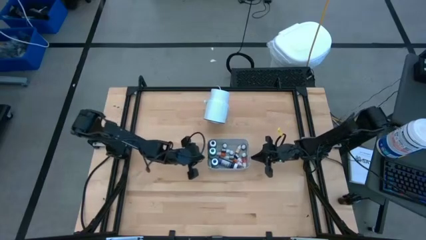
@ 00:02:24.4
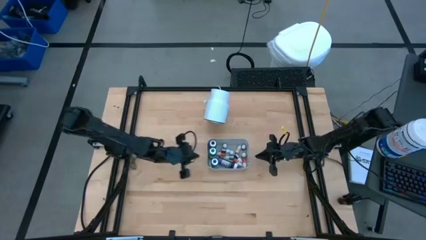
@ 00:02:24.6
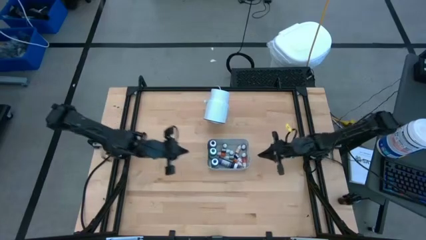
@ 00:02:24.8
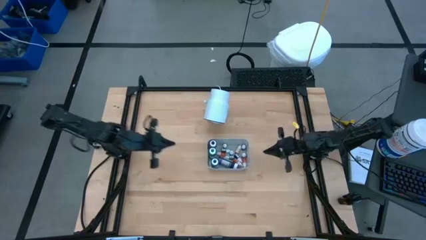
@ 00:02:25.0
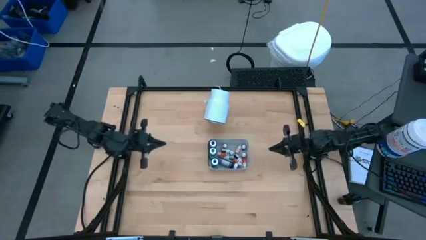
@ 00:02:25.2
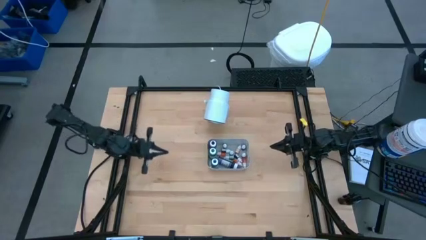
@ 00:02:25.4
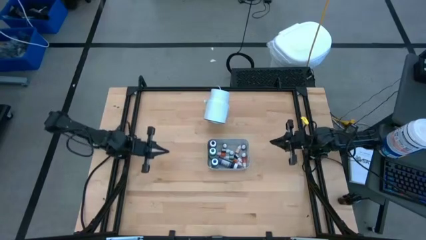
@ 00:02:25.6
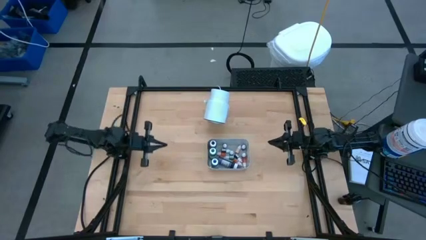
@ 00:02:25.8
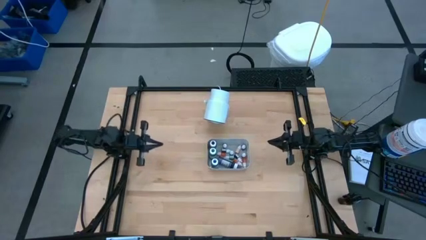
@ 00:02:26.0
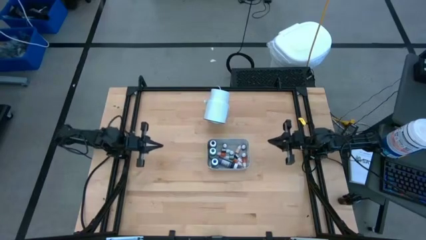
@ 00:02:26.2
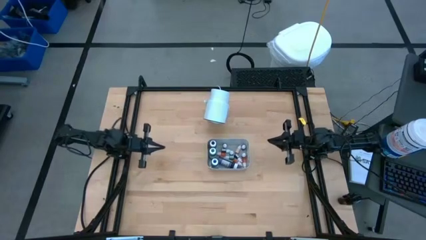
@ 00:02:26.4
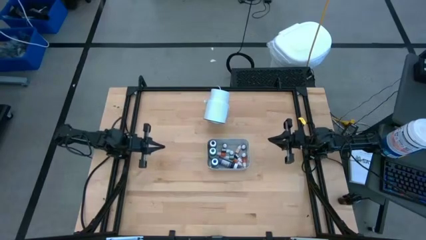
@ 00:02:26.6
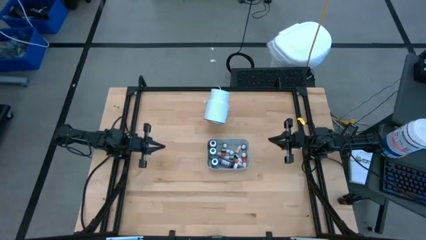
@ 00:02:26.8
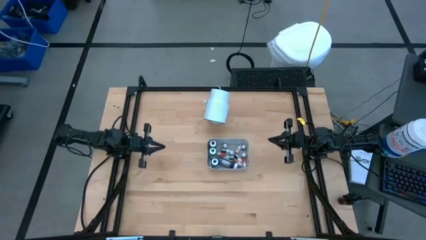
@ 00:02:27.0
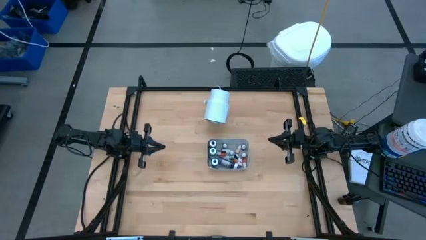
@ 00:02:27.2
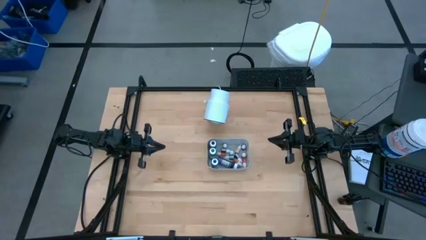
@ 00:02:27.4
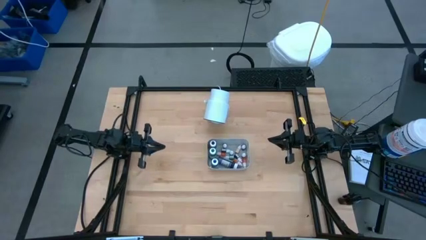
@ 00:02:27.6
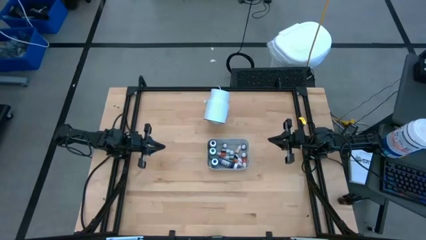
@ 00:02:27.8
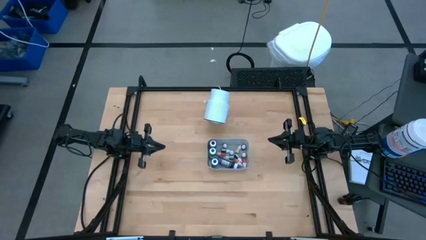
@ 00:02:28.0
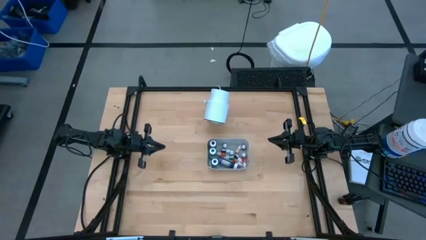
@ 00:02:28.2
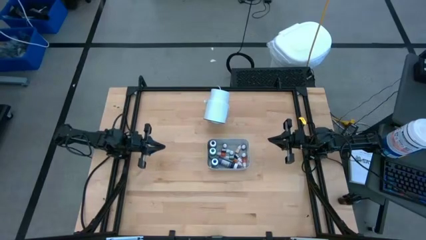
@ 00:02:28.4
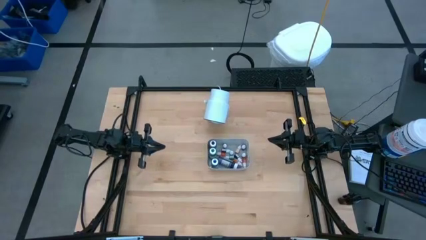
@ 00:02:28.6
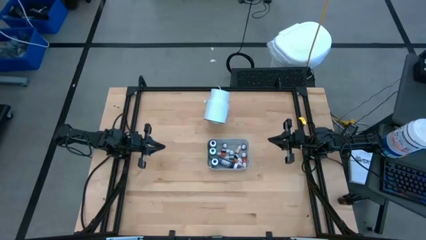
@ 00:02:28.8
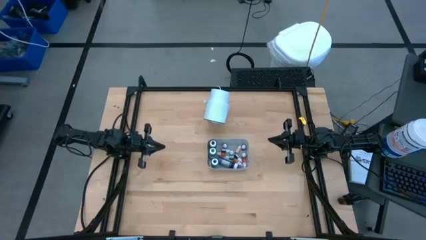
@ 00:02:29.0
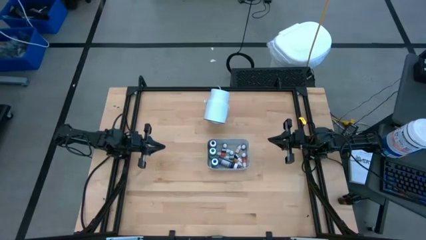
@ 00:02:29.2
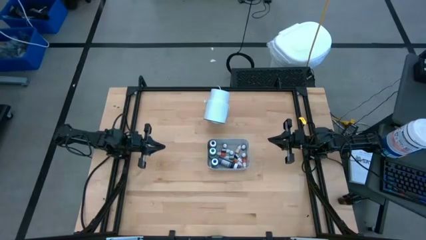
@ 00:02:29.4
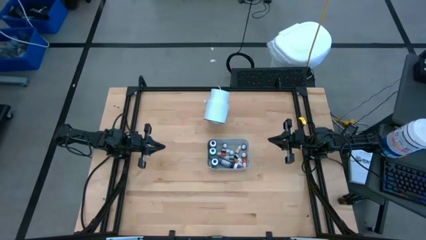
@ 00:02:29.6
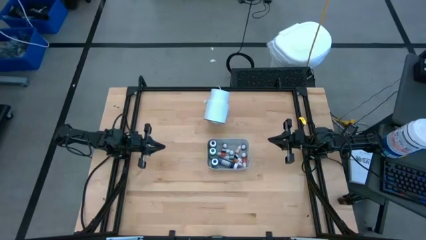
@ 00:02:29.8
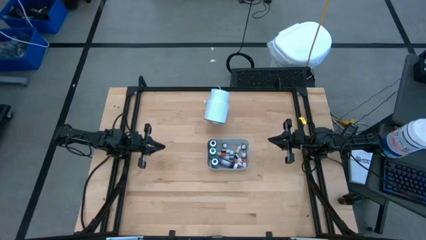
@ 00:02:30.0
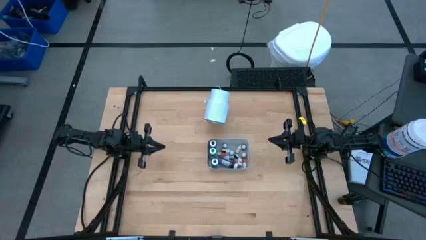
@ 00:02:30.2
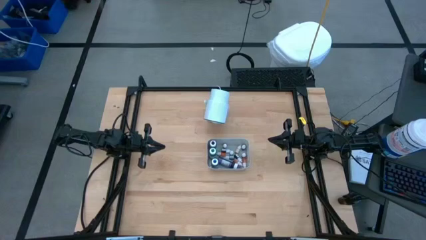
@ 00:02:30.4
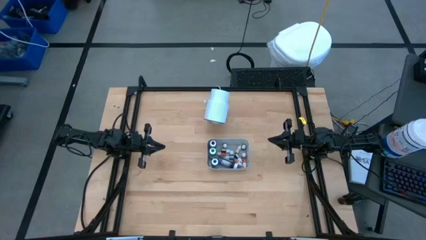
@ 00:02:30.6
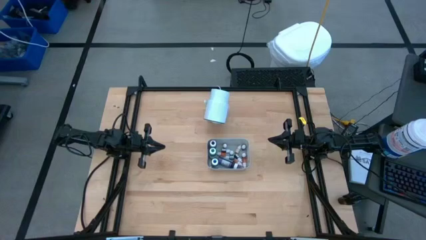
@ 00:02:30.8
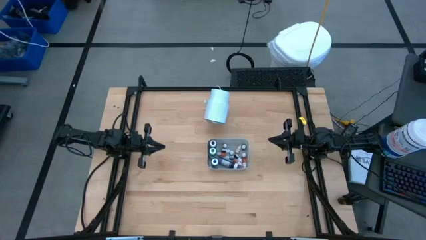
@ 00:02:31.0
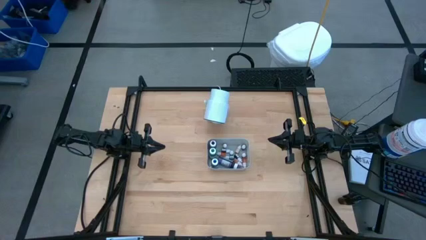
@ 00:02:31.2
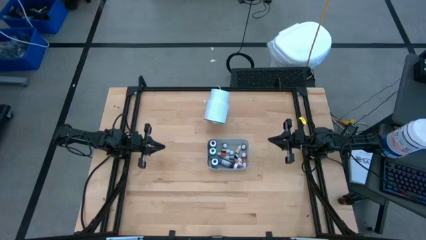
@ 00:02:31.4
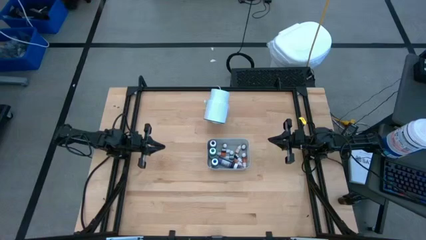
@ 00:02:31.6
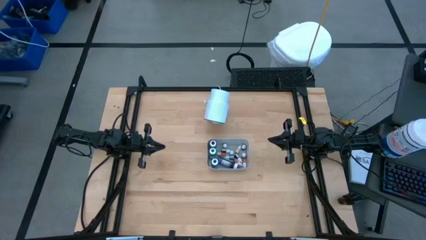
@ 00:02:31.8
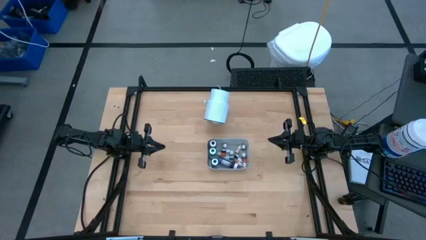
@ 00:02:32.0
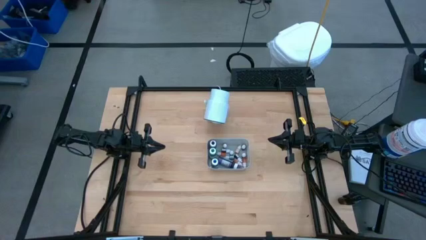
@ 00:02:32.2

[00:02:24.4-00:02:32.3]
Task: Pick & Place food coloring
Return to Home Position

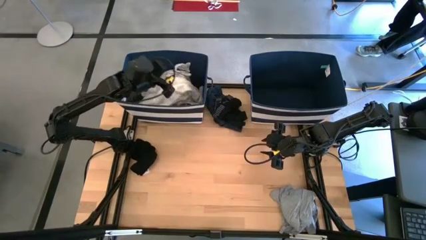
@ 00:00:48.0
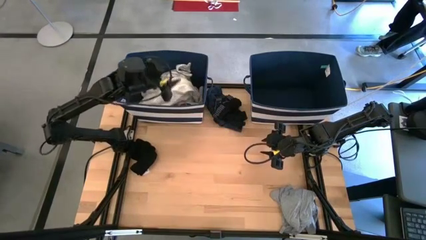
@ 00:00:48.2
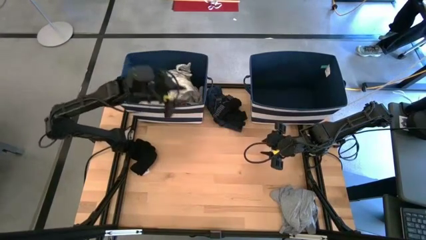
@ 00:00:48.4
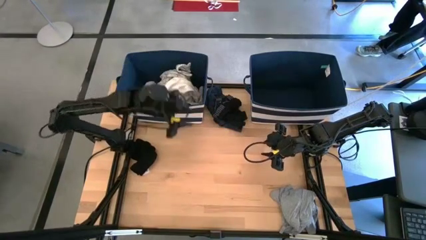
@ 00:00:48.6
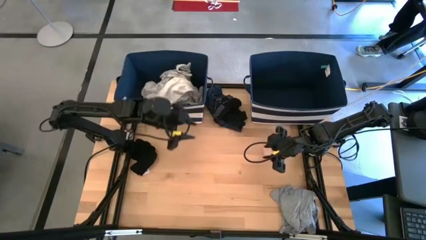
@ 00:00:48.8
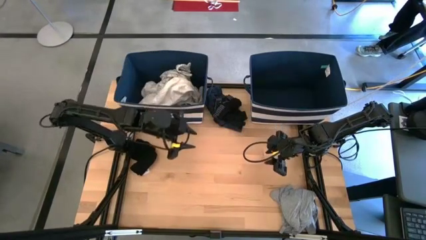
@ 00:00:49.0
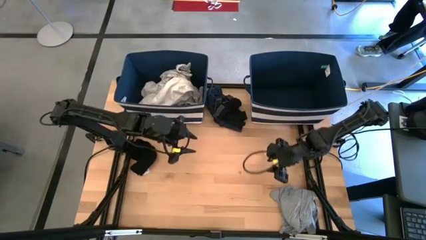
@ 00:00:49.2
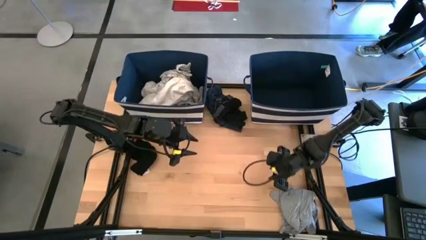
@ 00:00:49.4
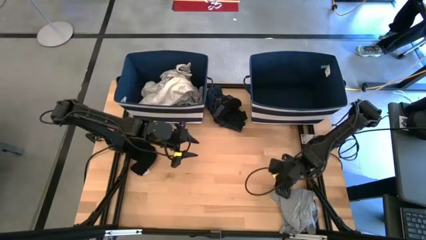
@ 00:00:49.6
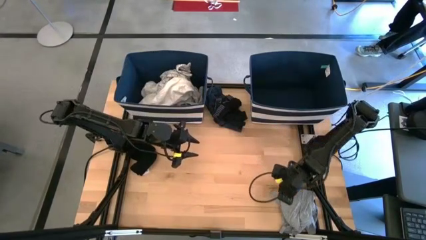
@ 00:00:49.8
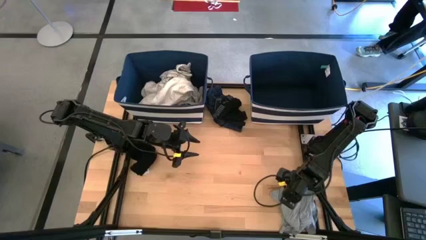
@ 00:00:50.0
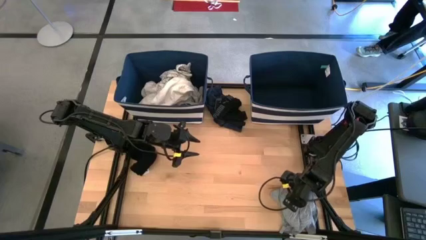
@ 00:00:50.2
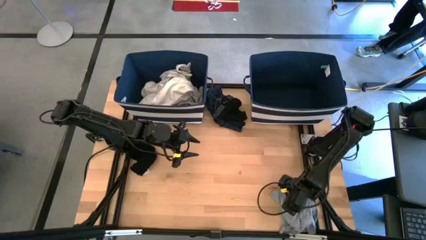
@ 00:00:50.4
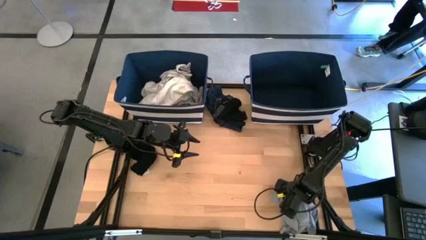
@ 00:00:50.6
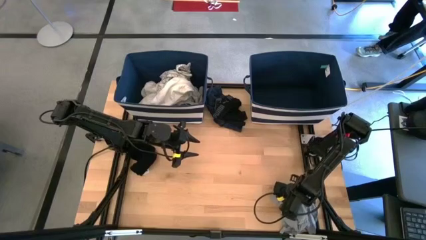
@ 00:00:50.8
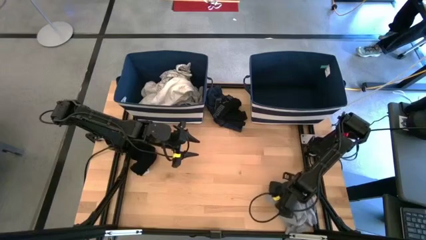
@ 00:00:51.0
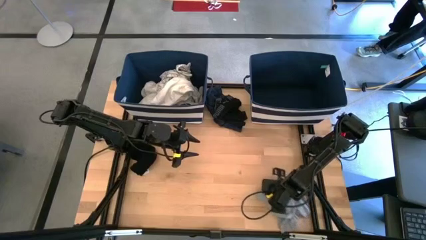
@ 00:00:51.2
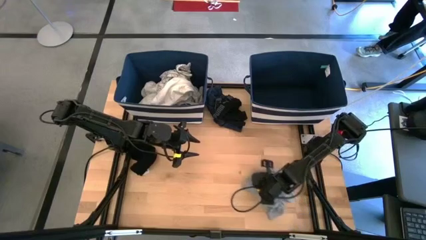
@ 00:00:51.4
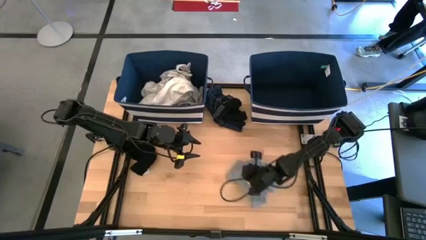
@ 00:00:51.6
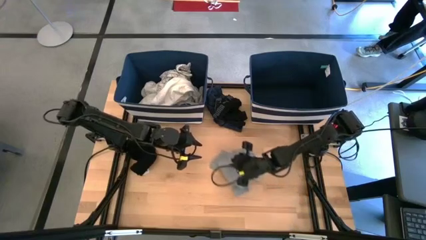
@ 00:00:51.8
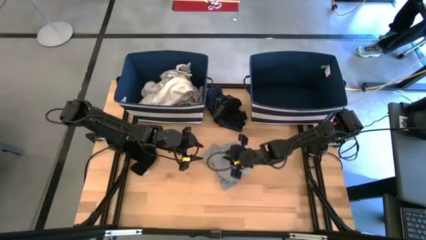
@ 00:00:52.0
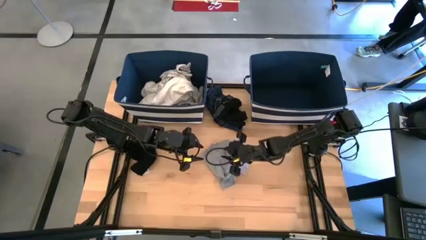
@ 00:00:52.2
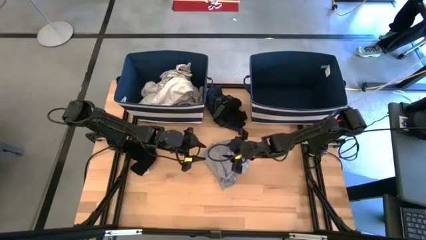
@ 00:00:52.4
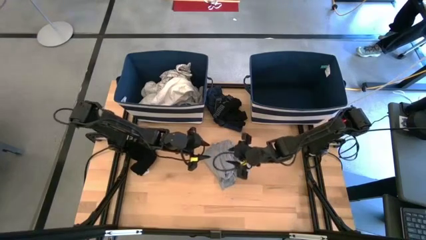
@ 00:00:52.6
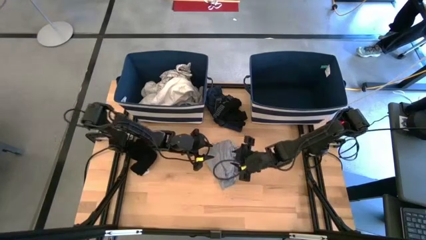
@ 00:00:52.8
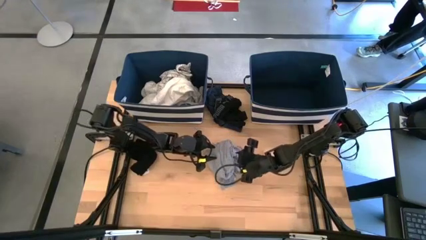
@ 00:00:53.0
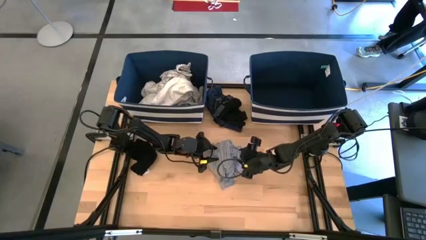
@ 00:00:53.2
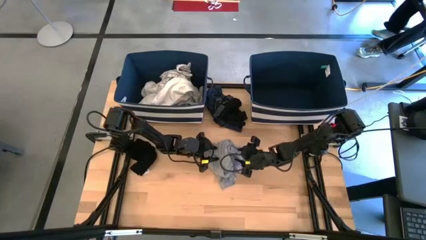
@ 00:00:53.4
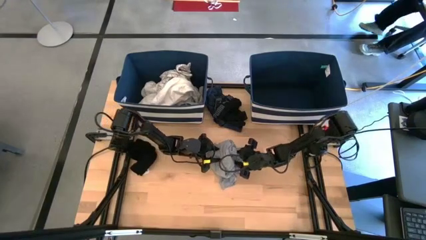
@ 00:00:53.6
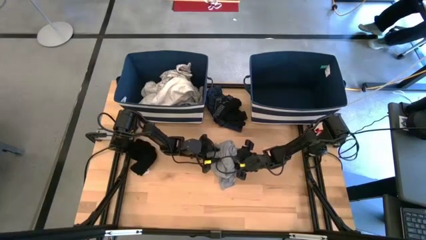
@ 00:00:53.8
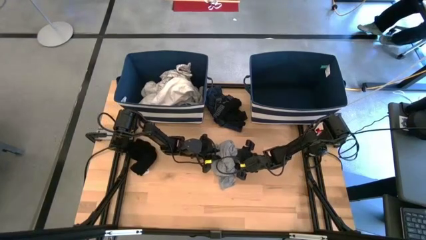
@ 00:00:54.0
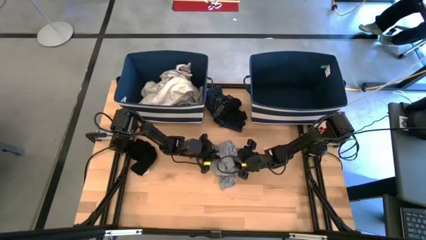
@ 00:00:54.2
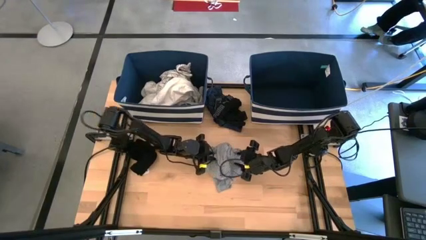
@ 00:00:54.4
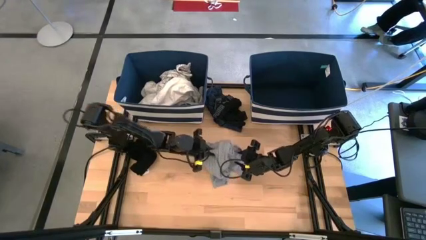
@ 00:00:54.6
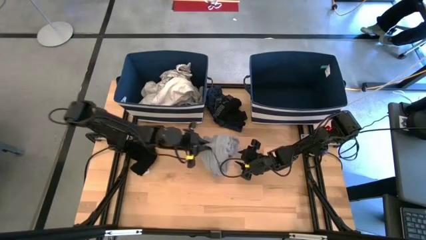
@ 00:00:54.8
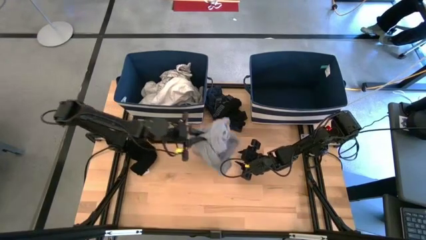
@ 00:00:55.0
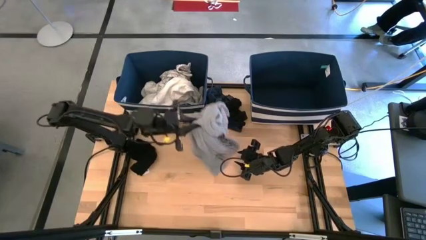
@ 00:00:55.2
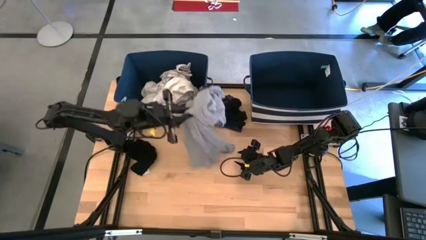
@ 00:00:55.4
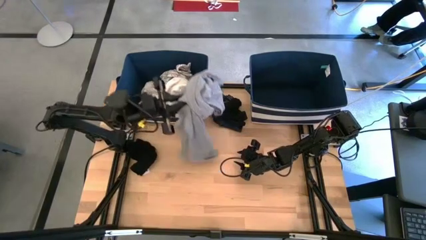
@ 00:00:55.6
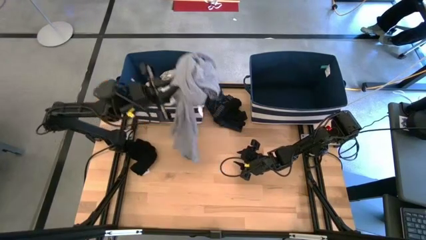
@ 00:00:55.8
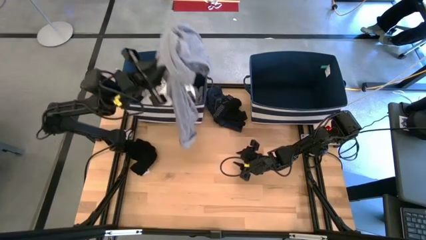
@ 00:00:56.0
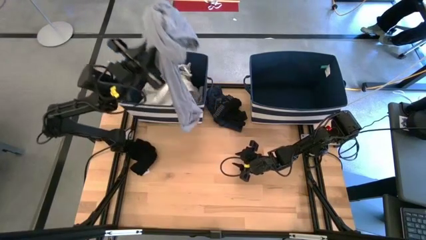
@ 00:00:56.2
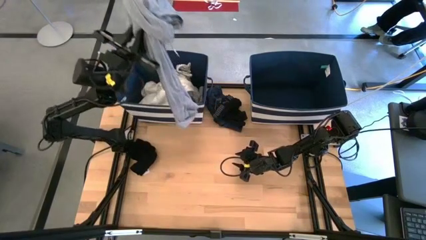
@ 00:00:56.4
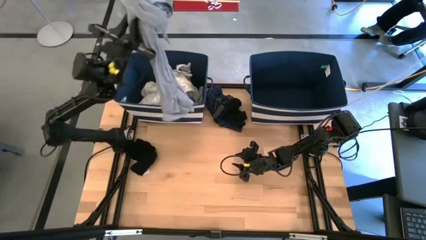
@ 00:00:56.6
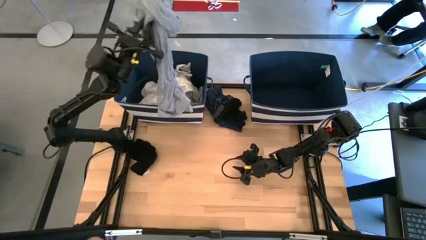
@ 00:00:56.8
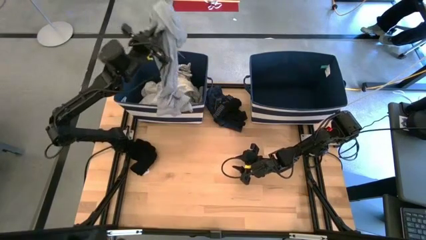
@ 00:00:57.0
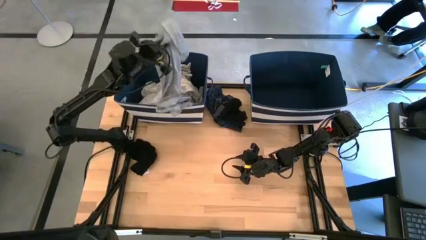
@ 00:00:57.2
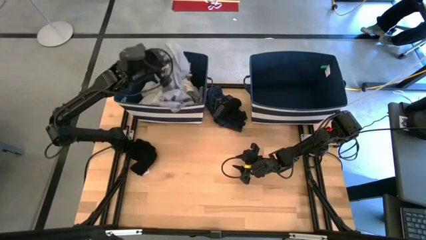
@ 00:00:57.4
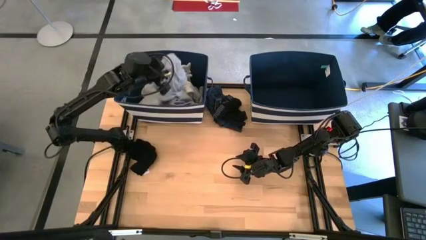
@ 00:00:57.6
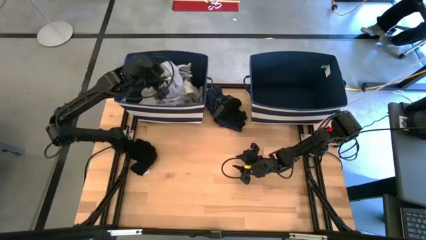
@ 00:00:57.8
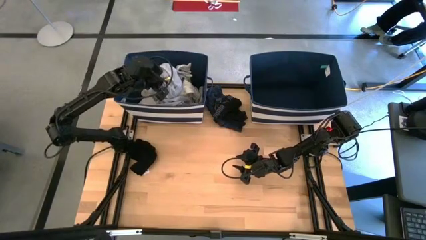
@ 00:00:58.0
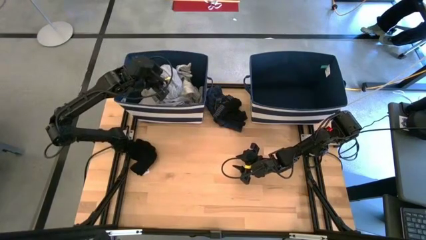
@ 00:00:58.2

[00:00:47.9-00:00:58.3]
Task: Sort clothes
Put the gray shirt into the left blue bin
